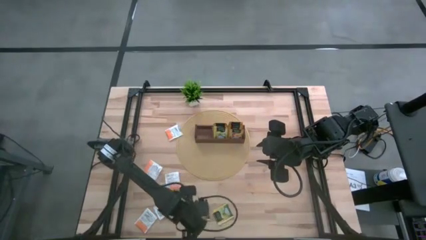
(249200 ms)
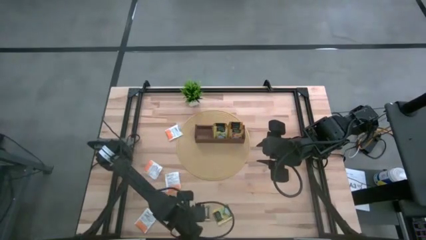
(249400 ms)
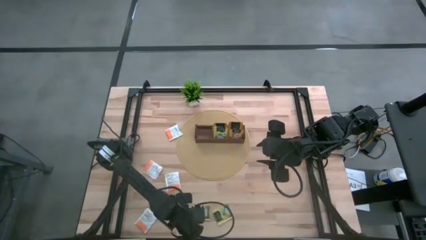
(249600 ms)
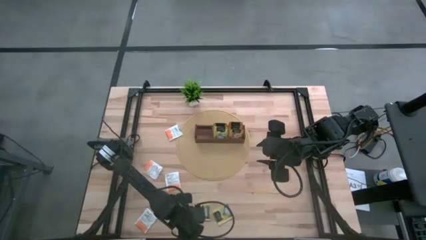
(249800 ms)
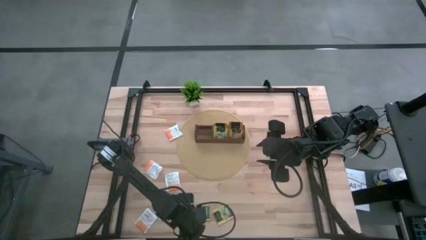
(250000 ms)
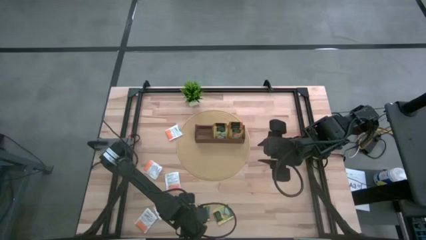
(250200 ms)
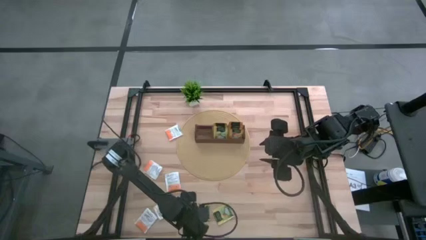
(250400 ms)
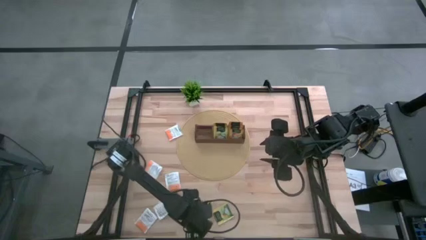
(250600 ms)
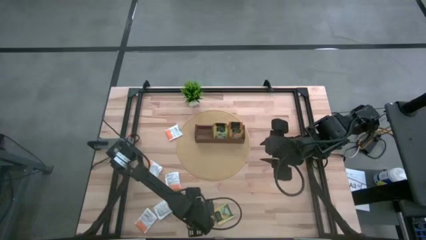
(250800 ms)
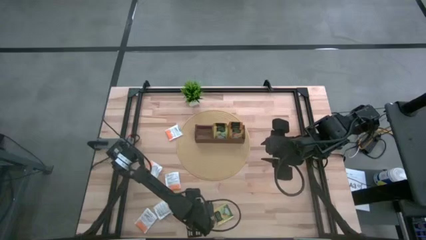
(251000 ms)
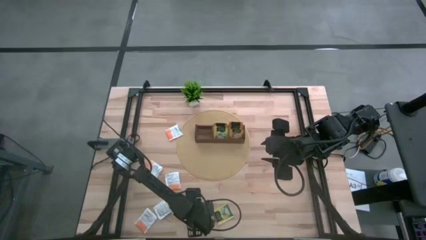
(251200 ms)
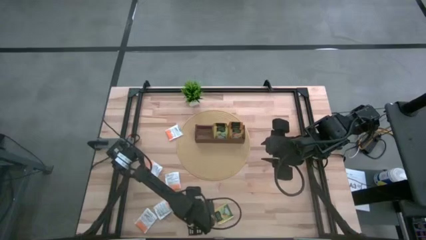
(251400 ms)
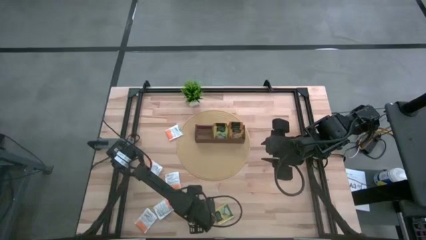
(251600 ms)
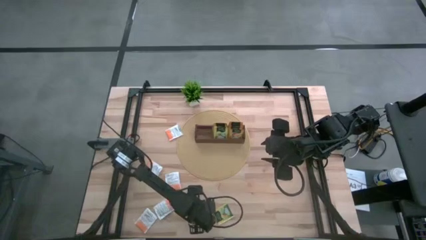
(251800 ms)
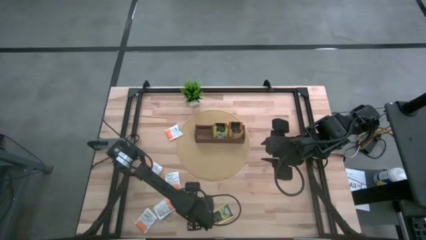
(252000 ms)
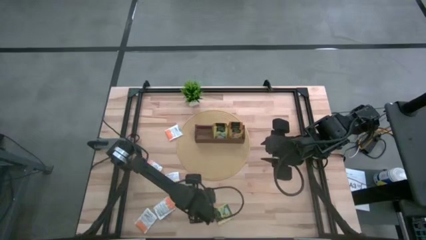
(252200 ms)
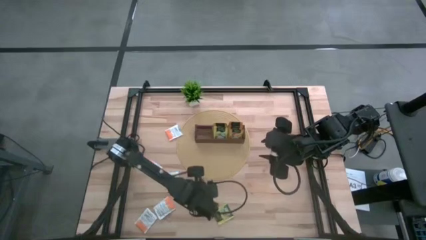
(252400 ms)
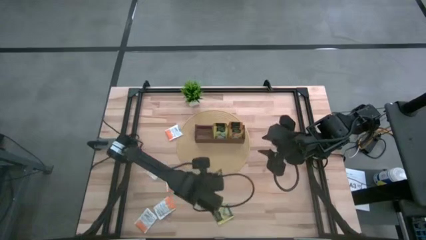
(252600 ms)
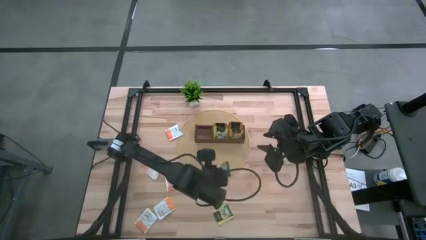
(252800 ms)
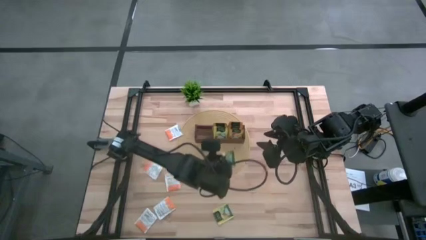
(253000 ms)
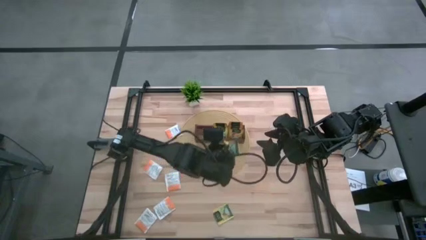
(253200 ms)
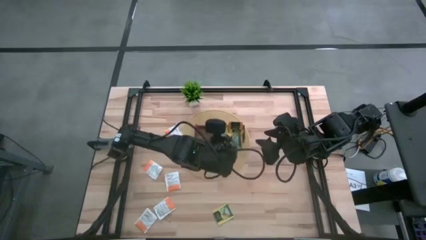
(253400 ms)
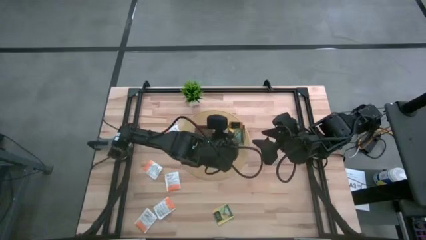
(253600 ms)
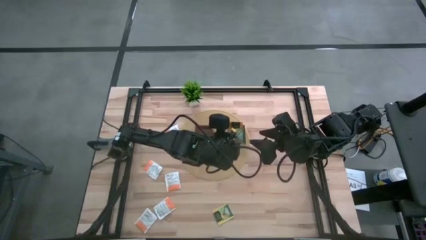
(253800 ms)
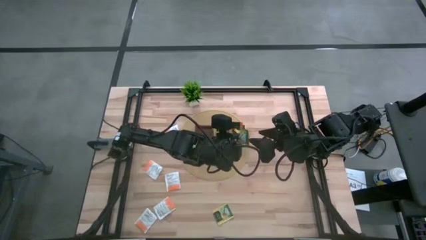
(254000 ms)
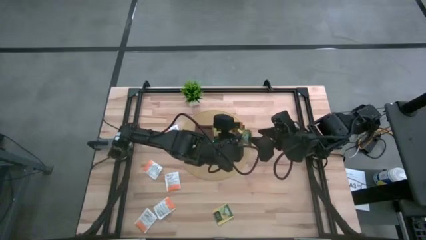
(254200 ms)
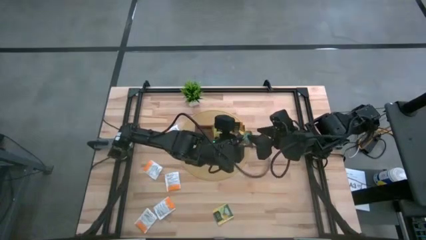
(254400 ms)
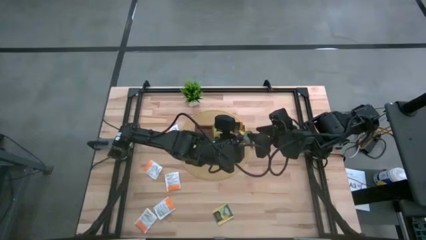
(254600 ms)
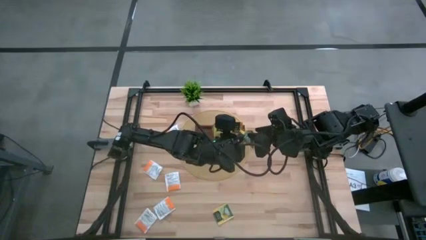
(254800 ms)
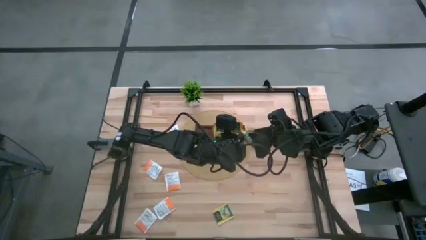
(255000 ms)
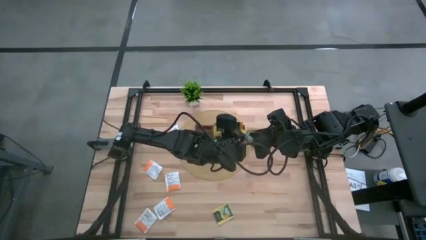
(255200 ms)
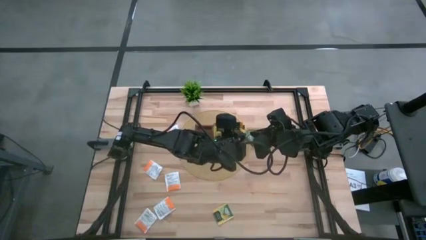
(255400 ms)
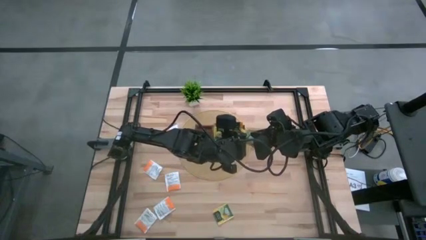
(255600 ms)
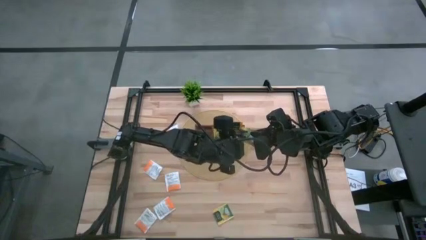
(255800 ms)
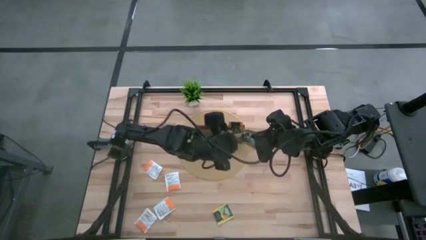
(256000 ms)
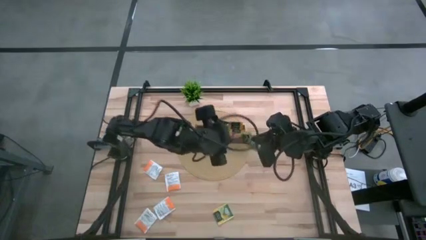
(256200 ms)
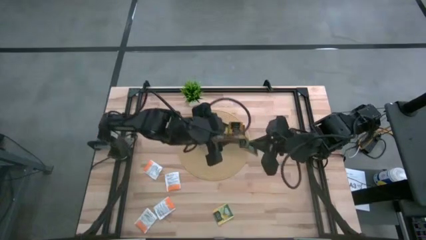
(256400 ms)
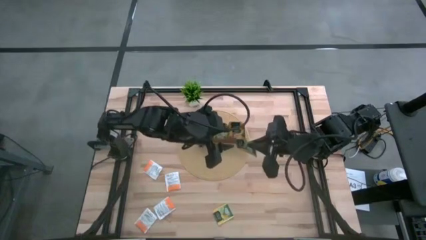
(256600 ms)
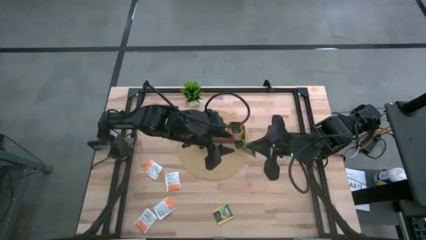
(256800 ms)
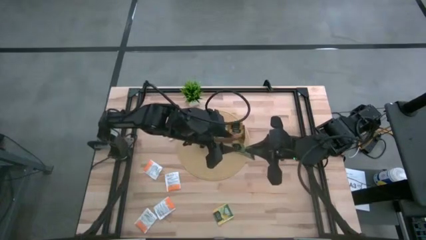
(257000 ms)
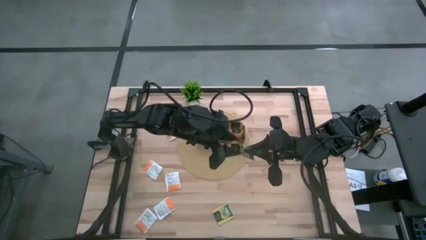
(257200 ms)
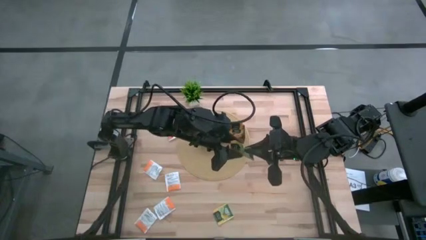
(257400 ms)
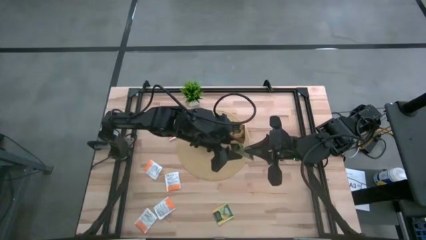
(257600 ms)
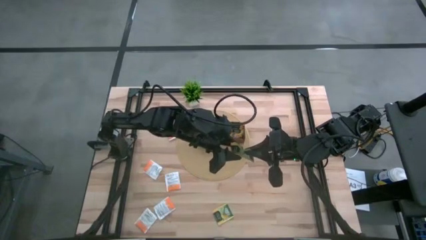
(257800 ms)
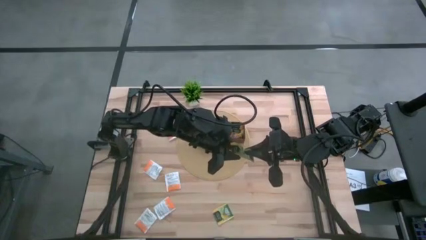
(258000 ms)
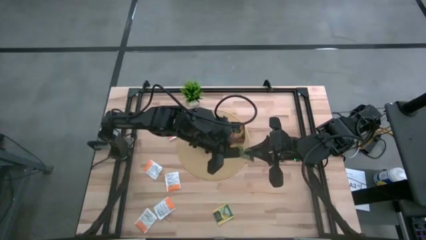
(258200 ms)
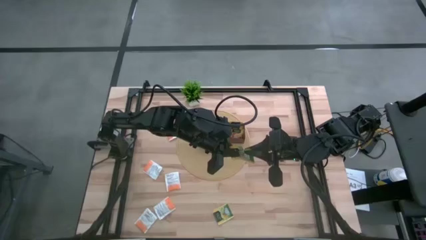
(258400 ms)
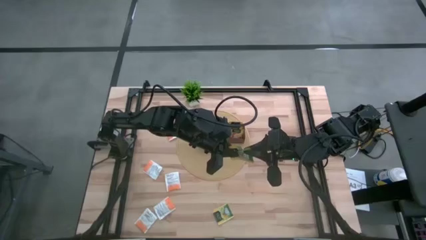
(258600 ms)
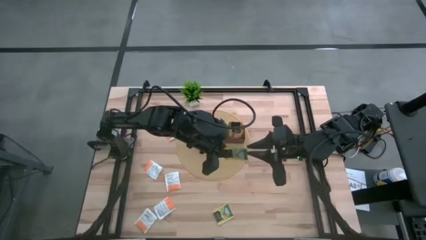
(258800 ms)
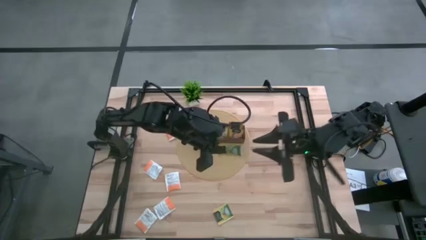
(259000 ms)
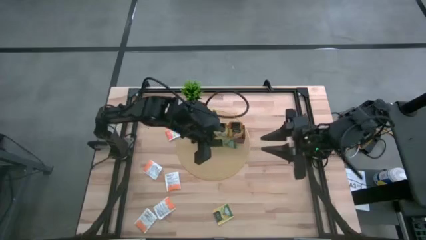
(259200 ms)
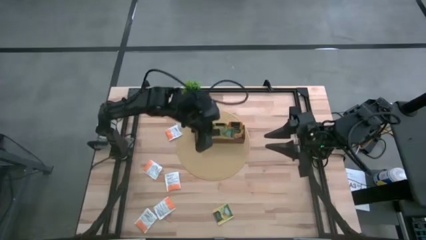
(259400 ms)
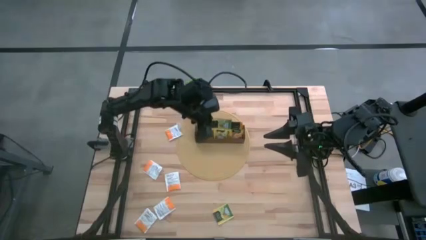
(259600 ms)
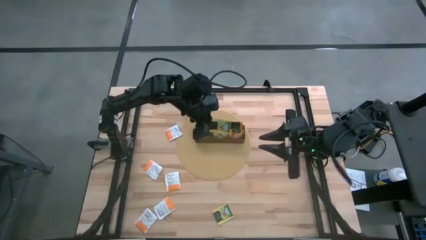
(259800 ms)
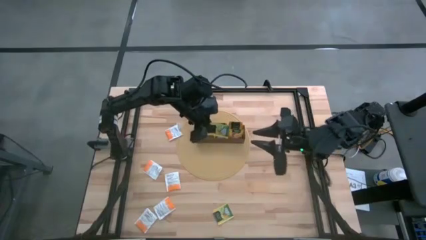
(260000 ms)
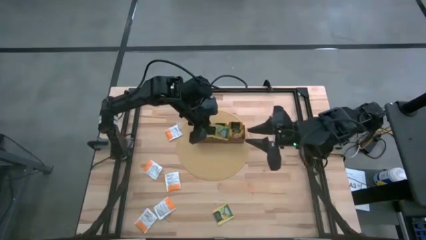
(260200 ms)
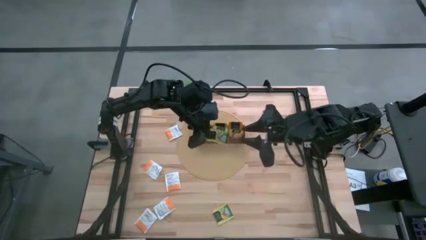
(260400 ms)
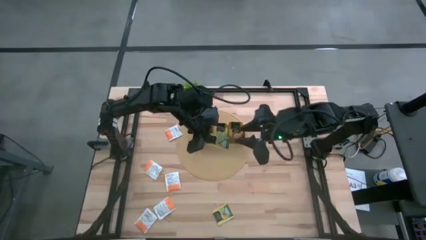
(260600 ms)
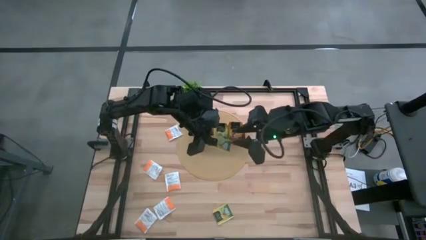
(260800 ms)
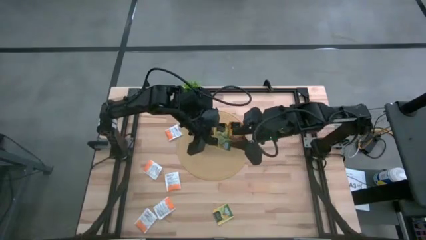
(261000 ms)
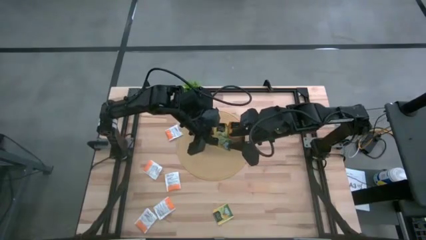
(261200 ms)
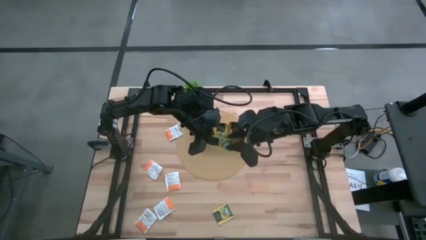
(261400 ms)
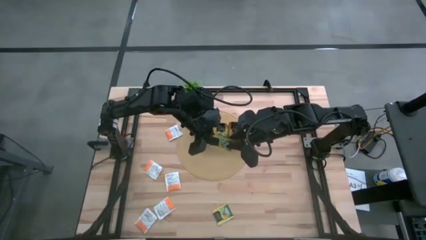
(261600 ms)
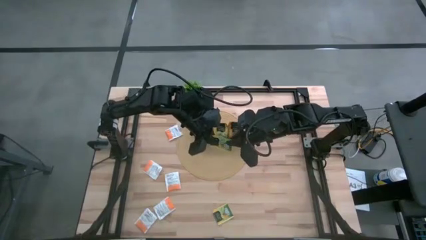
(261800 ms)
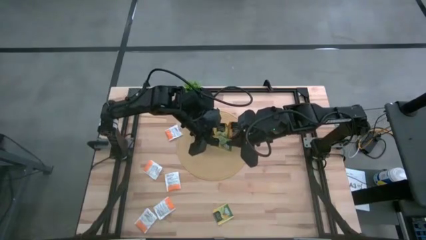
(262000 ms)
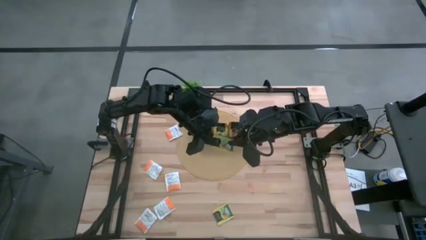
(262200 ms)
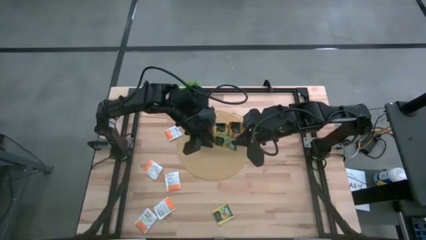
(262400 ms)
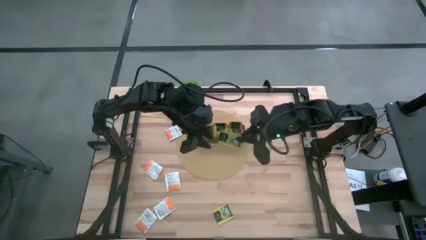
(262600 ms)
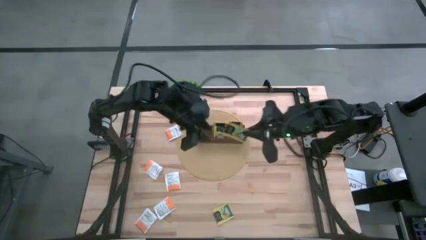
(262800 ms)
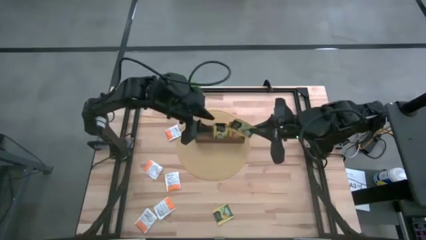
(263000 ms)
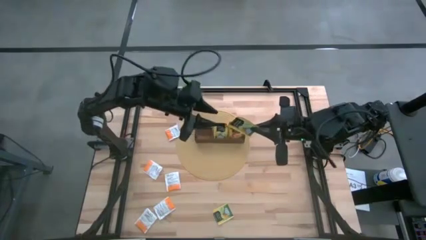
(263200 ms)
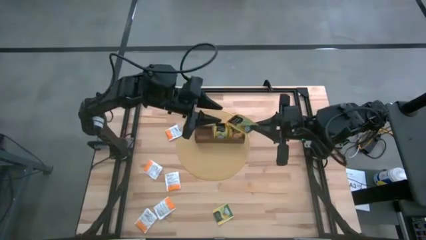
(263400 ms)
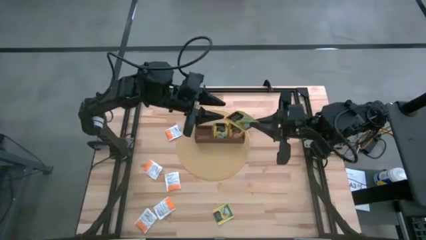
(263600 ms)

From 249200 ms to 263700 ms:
Task: Pick & Place Tea
Put the yellow tea bag into the middle section of the wooden organizer

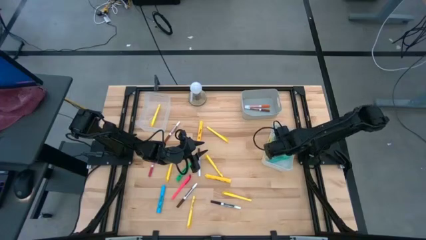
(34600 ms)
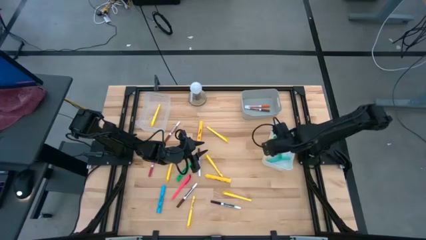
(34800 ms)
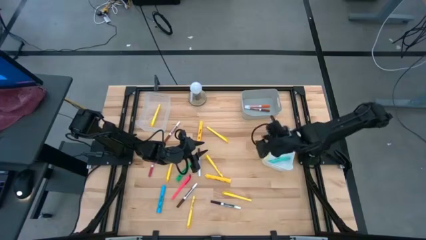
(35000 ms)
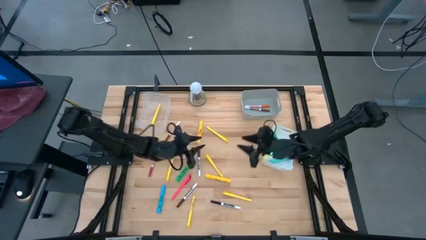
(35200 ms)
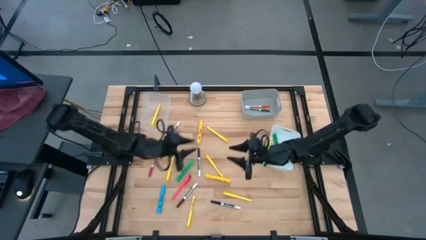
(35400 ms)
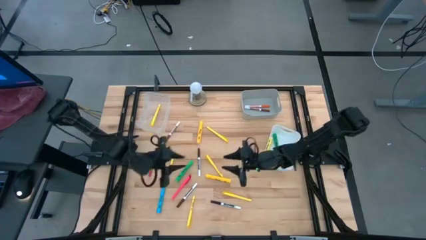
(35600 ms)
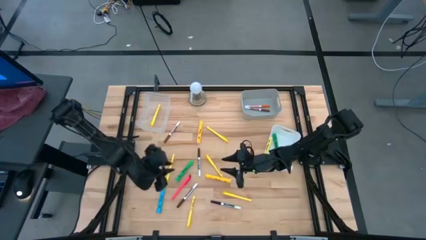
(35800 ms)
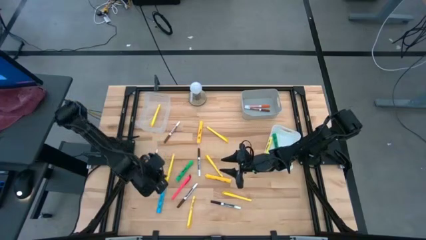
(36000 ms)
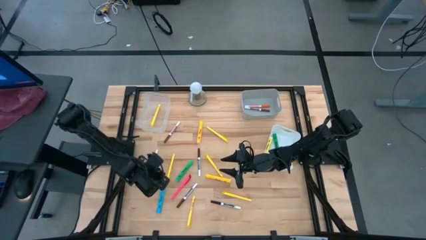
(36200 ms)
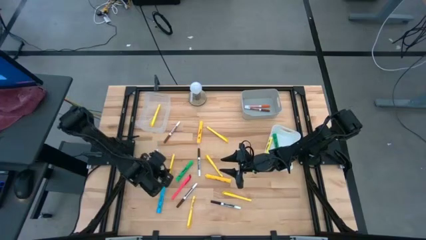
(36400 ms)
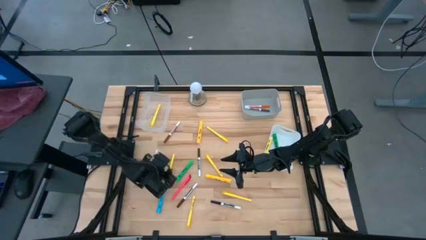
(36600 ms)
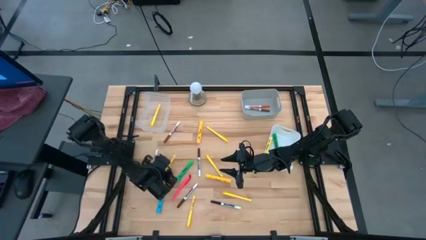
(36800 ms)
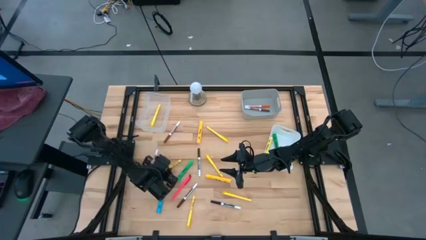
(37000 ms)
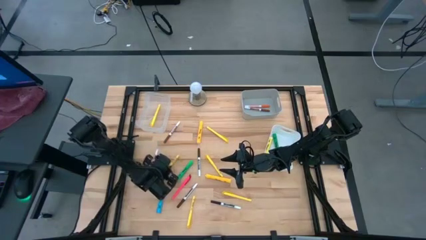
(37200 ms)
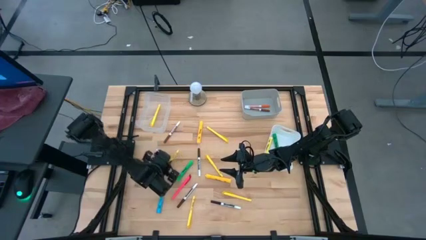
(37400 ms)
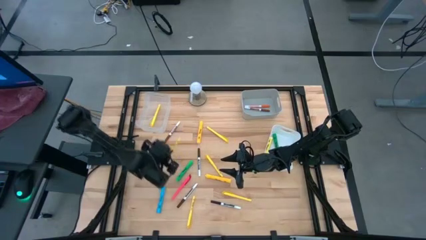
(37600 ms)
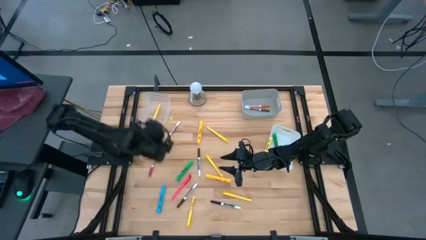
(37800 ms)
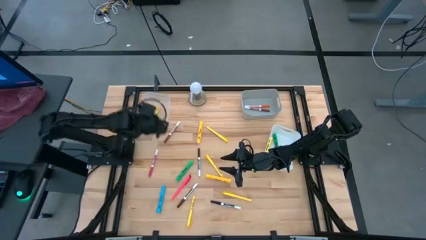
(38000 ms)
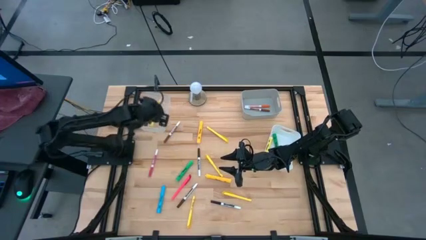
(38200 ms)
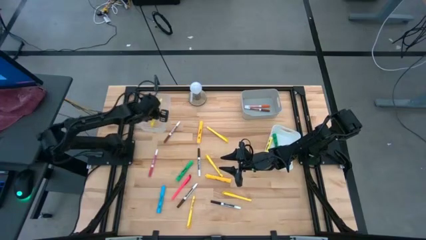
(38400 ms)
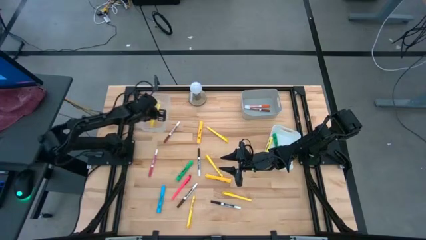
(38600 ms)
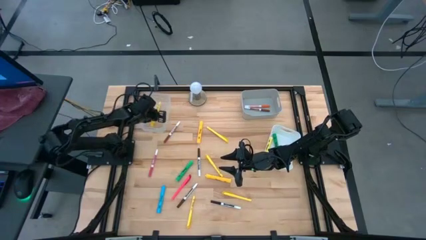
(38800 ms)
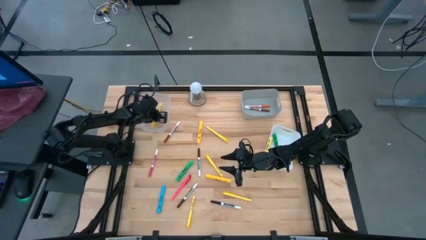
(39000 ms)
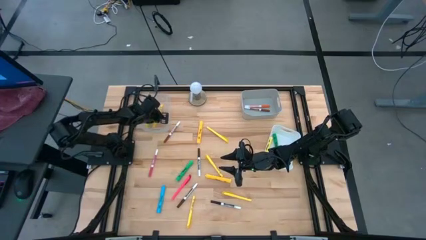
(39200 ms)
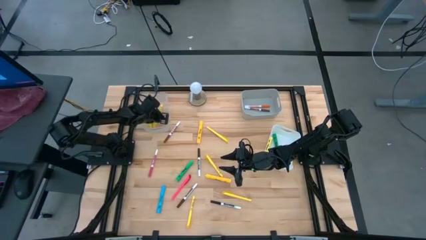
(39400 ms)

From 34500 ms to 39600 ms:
Task: Pick & Place Markers
Put the yellow pen into the transparent bin
